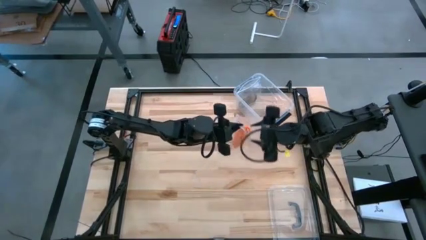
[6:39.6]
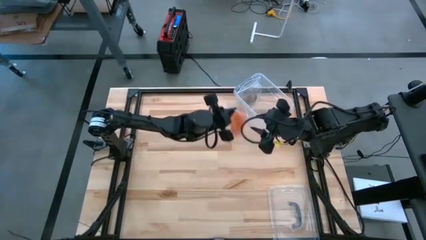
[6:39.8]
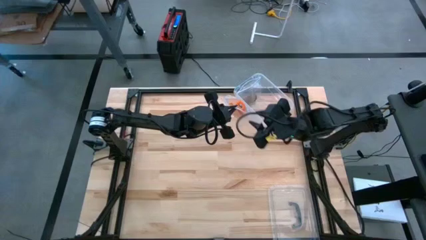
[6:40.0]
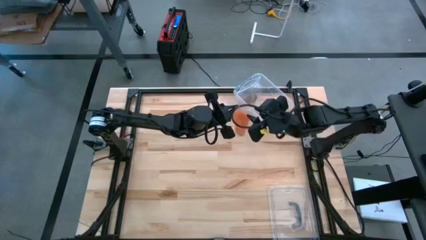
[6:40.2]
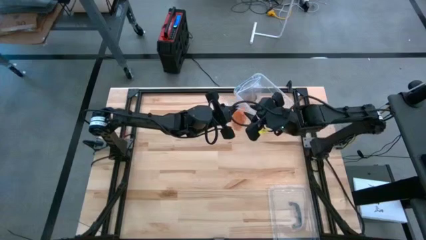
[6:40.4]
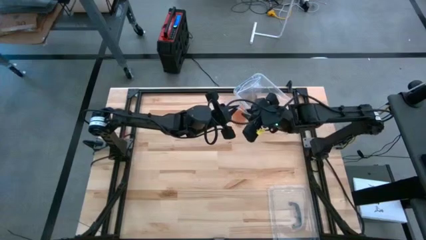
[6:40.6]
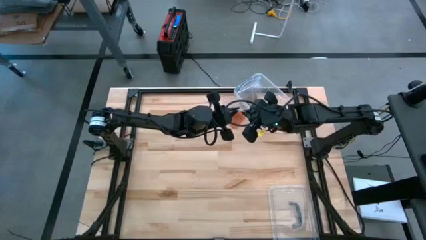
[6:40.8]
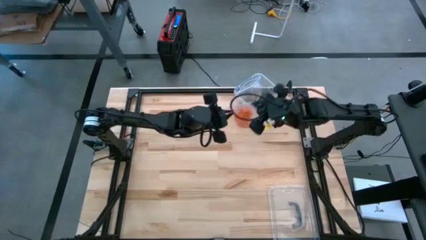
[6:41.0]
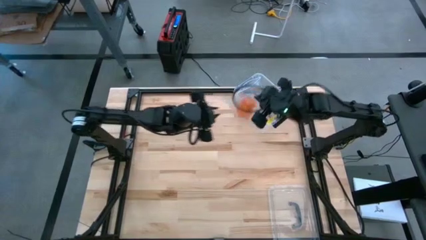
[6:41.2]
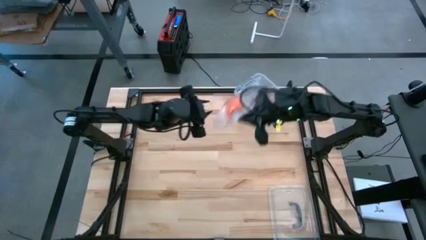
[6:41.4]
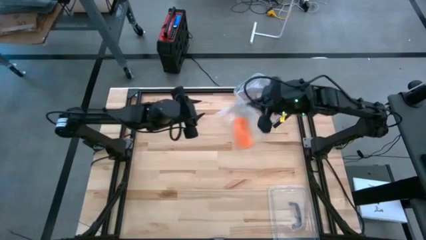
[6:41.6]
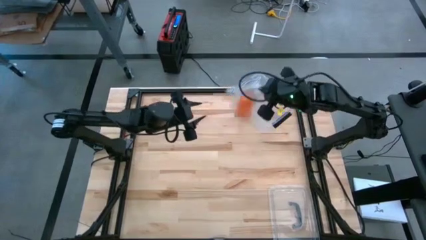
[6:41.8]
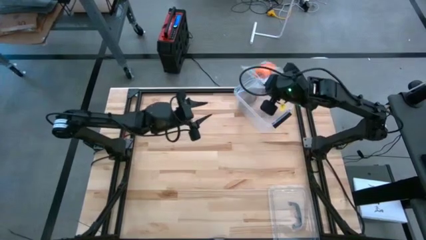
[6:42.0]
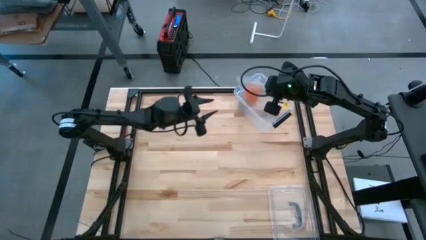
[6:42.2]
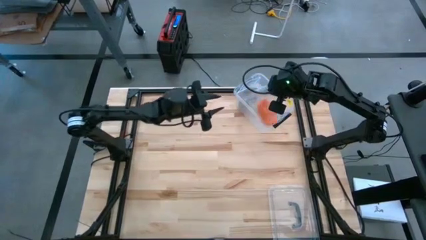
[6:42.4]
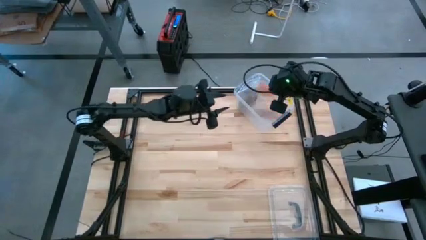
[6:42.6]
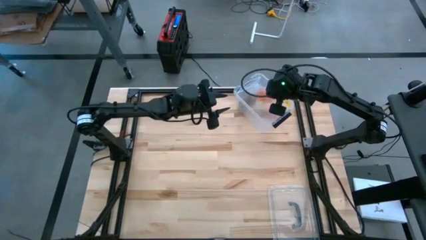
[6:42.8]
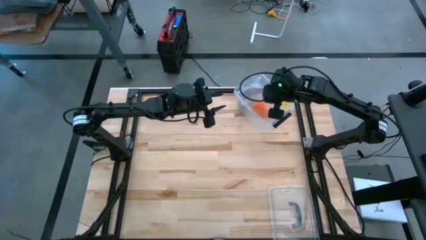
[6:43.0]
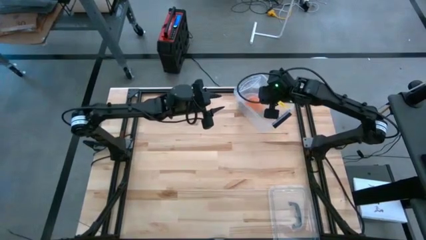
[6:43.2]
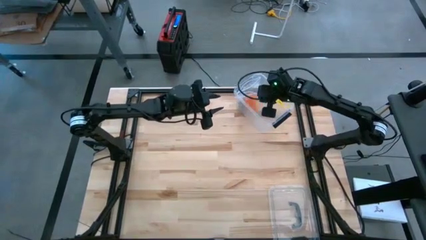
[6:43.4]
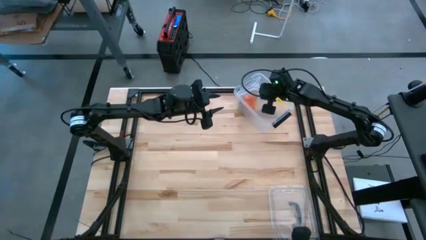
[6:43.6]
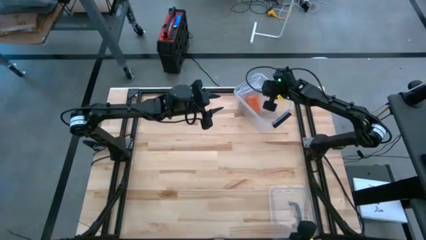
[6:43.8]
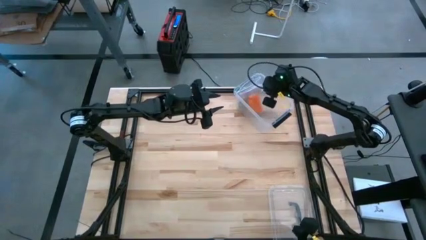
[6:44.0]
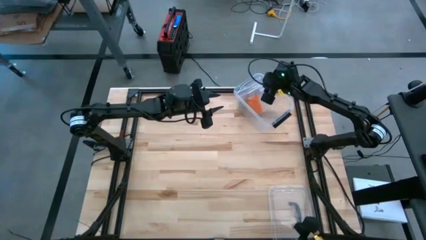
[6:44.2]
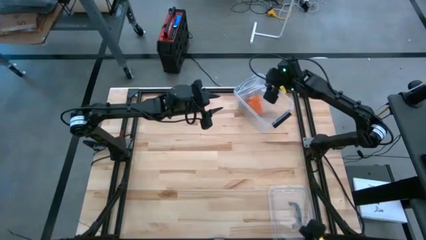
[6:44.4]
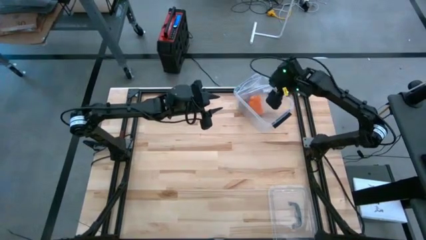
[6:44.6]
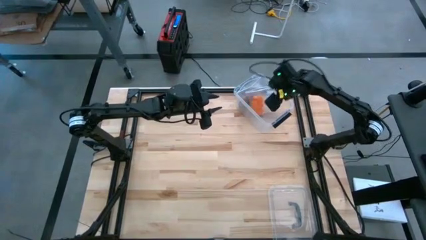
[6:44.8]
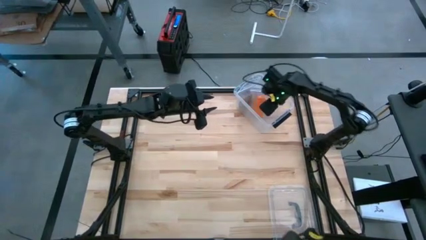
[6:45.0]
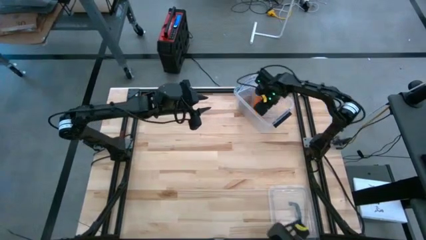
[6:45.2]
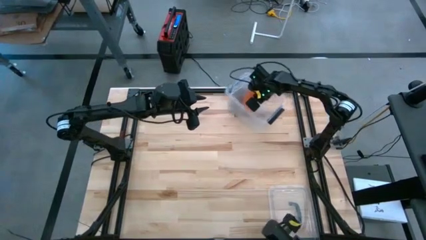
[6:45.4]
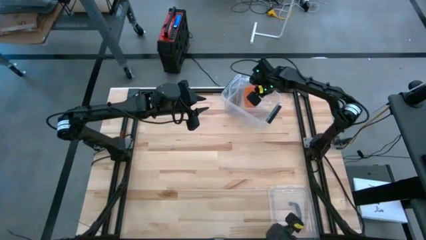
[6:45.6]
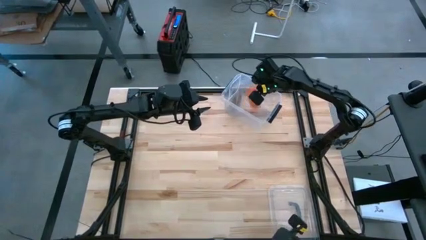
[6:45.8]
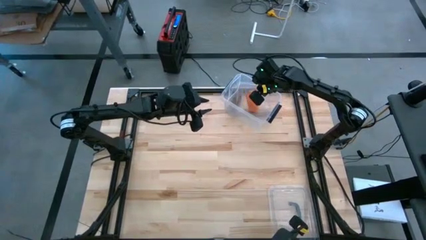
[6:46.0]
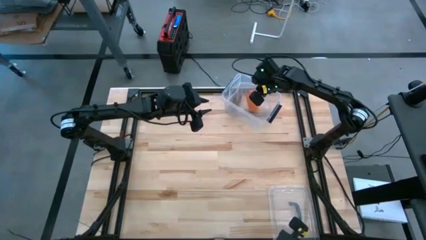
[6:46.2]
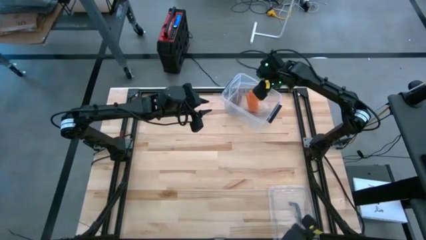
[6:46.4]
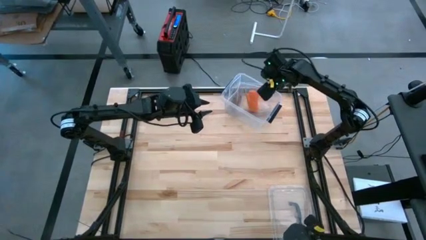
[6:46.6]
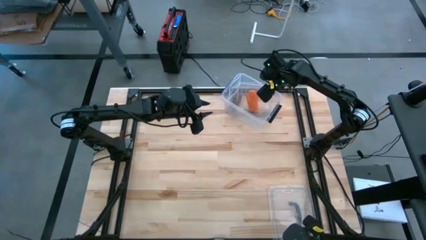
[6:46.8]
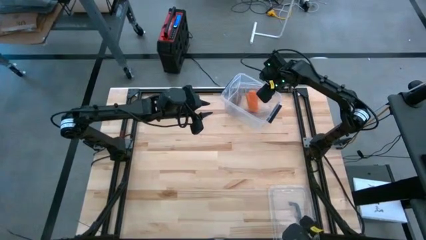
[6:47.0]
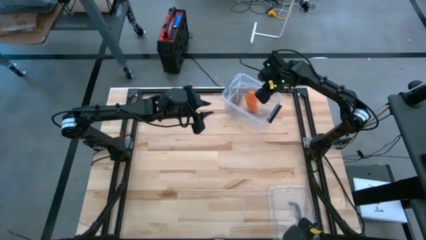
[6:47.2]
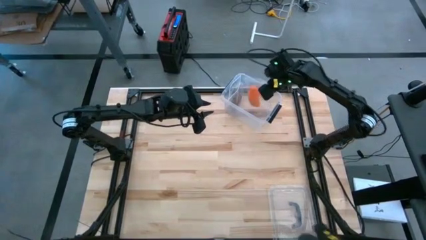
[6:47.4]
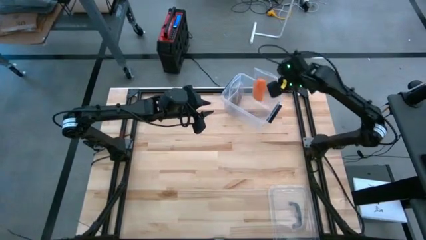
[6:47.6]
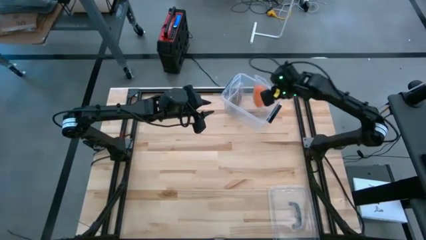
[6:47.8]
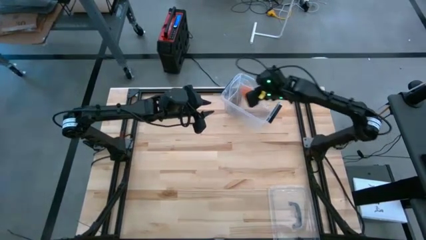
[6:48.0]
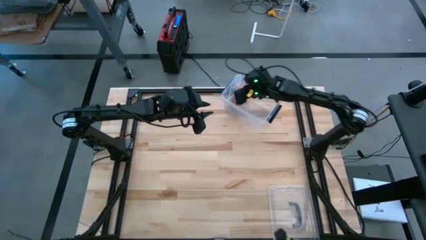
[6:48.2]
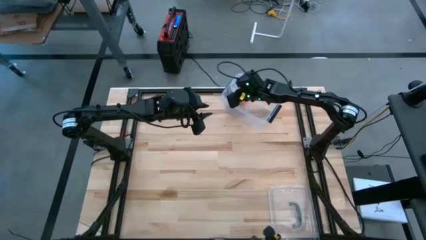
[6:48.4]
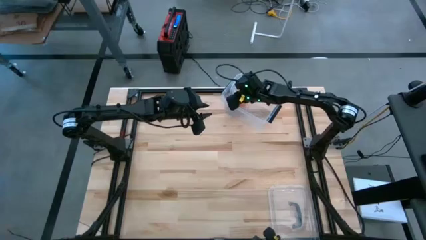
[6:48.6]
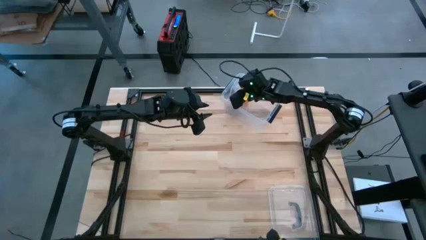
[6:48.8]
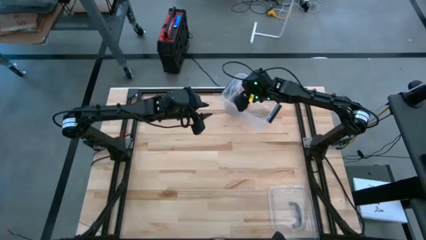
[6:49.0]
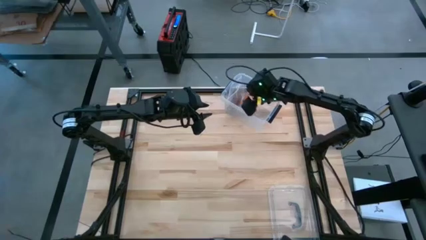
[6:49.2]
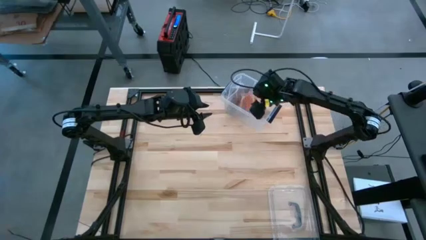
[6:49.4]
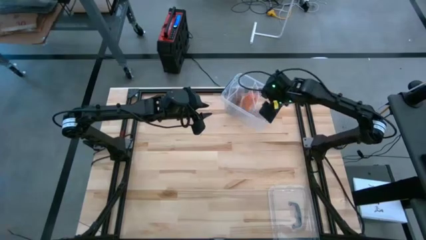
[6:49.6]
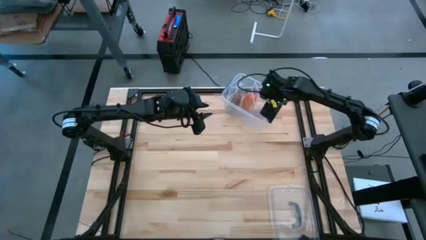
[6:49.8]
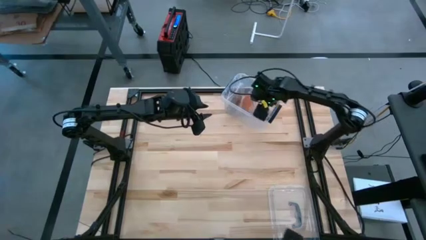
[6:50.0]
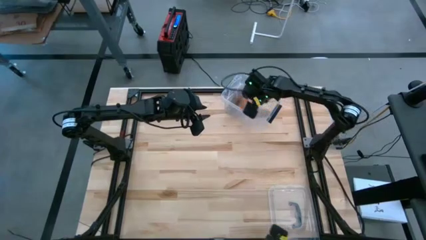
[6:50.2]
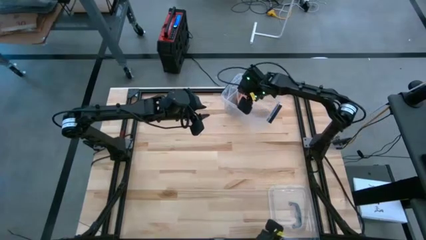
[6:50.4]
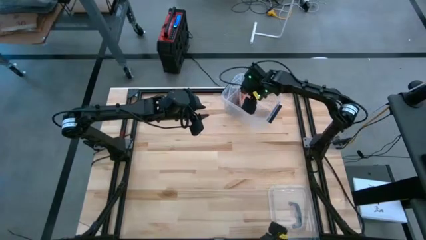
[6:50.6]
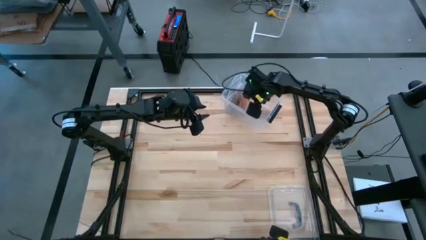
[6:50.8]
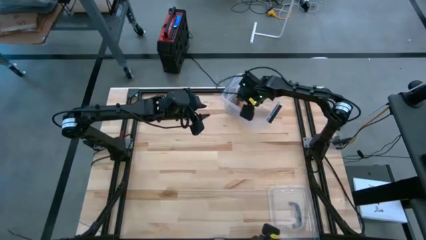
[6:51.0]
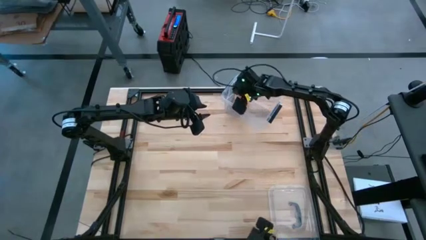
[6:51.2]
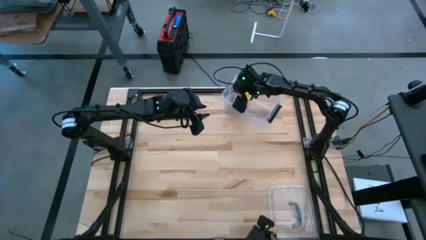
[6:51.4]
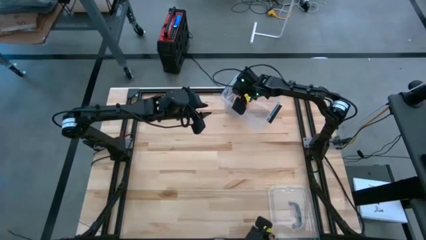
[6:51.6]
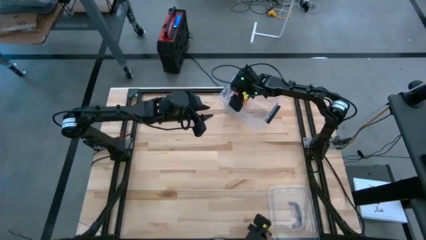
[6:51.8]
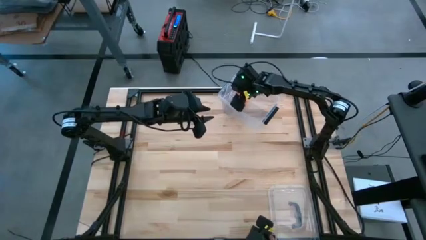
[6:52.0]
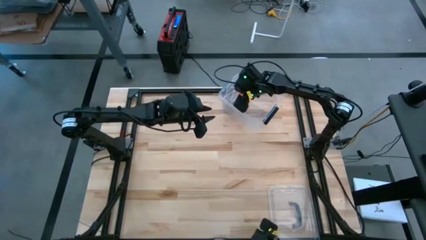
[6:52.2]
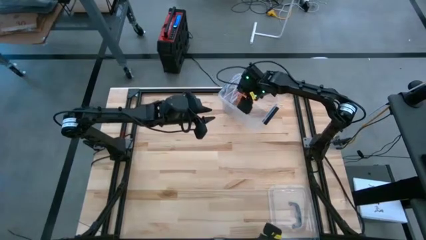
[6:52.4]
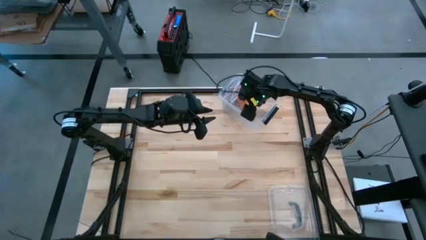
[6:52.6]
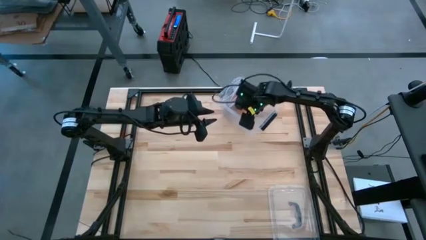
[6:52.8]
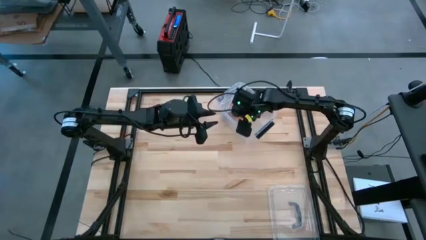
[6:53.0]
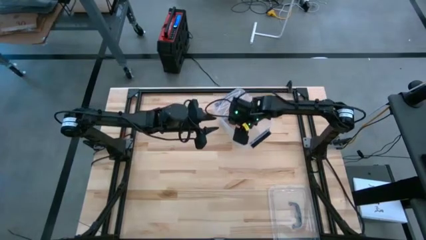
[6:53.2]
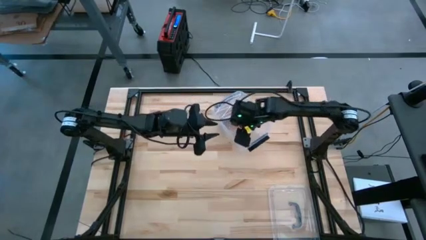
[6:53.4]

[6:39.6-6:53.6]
Task: Roll bandage
Put the zip bag with the orange bandage into the transparent bin

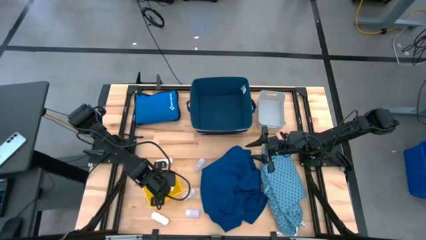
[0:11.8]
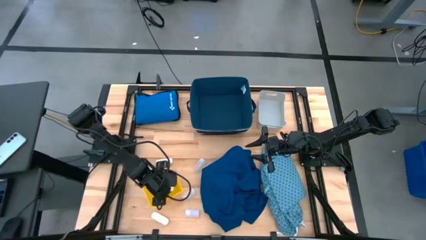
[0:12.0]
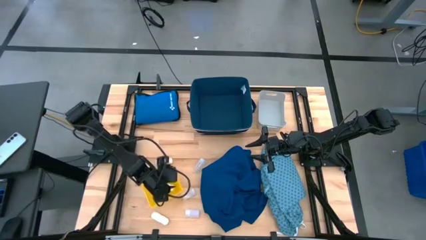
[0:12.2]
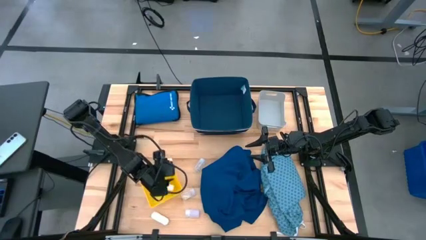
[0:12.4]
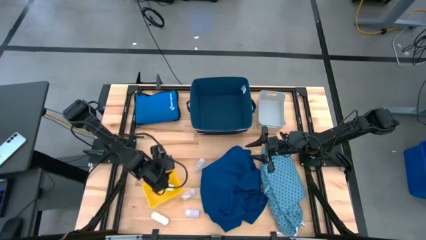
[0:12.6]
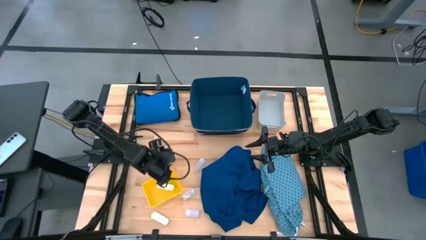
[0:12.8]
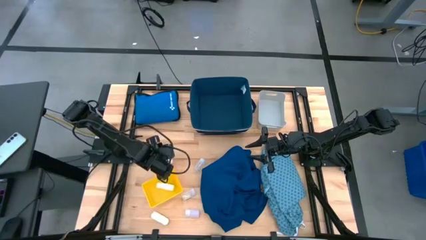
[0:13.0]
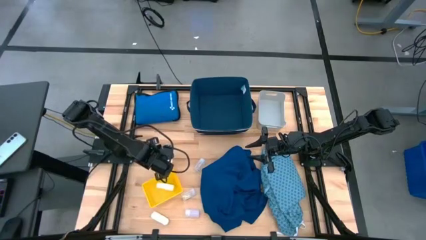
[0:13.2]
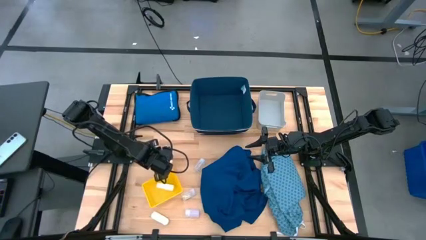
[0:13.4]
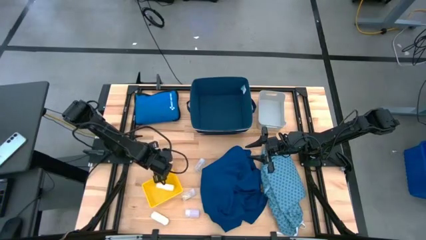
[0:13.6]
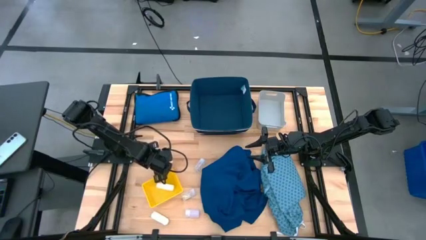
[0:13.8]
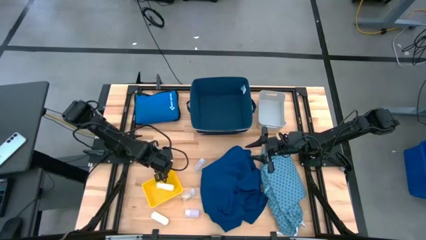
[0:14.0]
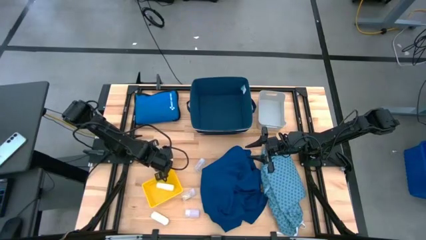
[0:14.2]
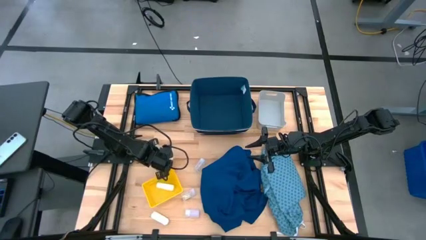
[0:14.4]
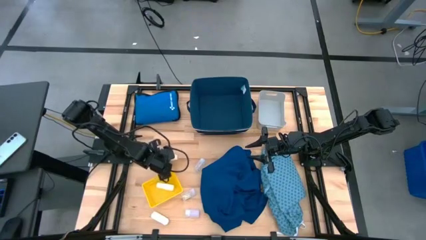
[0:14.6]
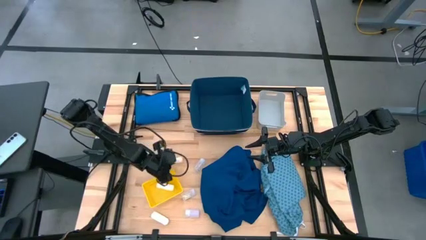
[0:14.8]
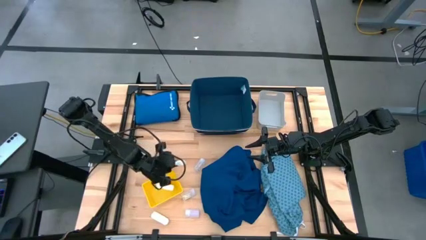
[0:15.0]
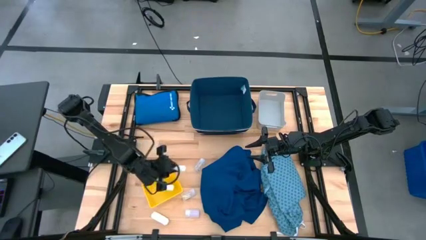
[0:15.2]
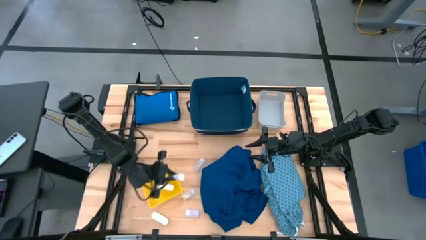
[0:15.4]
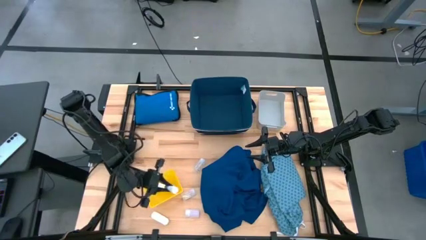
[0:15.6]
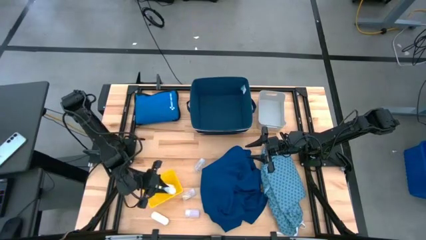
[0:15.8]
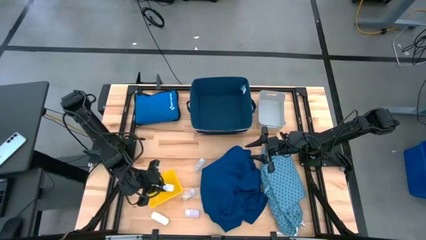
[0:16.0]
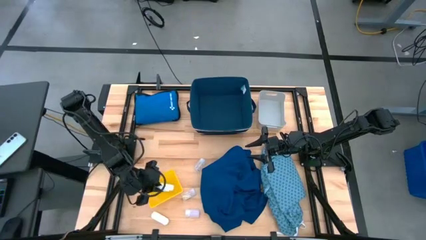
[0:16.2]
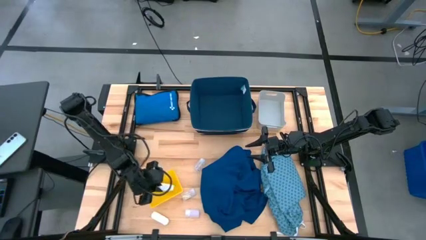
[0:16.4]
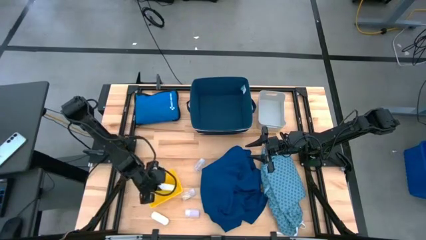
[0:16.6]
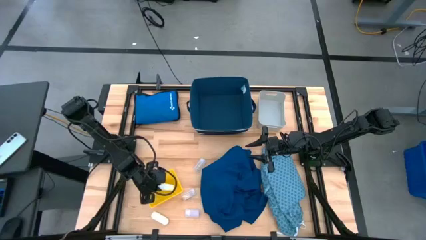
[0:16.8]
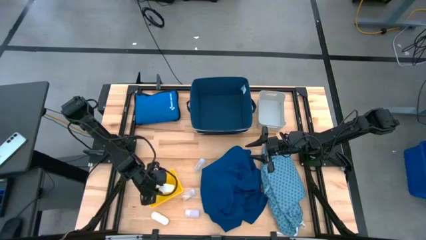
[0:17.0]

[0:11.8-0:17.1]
Task: Pick & Place Medicine items
Put the top white rolled gauze into the yellow bin
